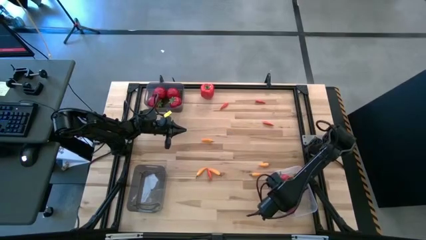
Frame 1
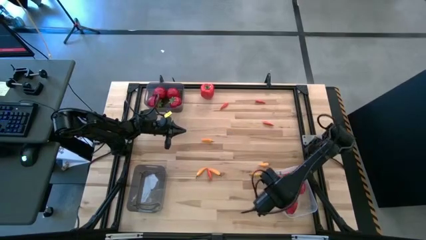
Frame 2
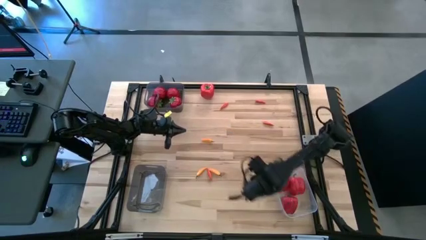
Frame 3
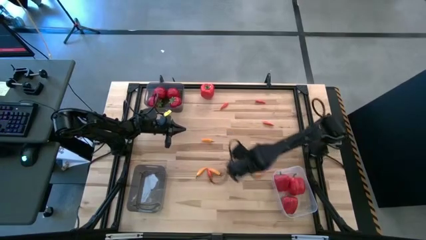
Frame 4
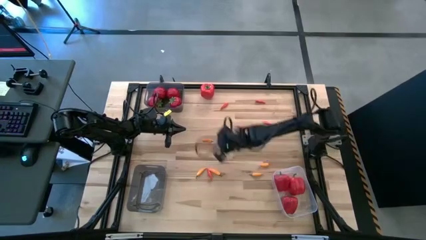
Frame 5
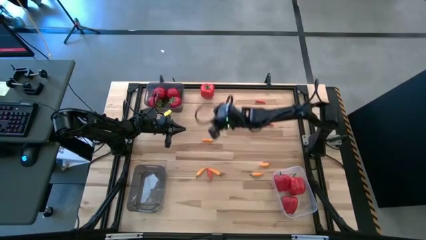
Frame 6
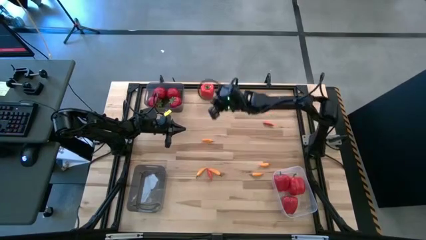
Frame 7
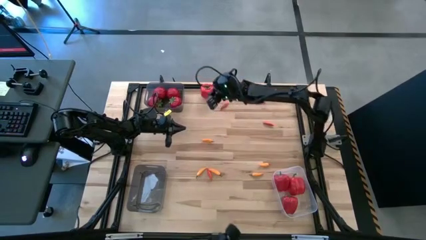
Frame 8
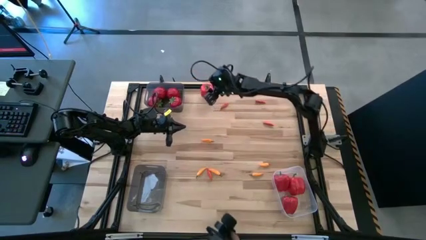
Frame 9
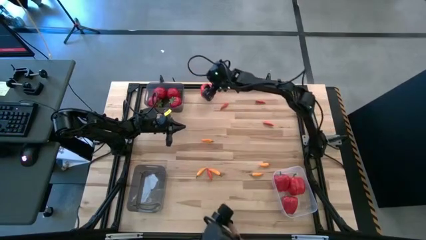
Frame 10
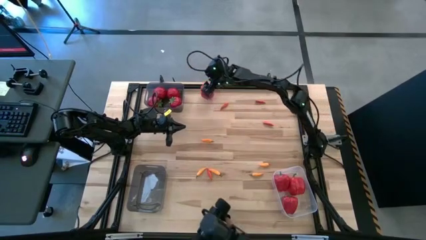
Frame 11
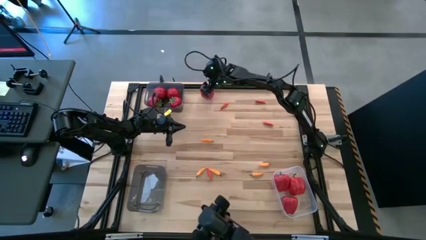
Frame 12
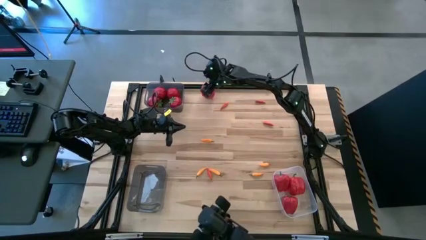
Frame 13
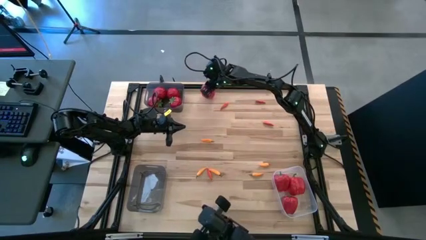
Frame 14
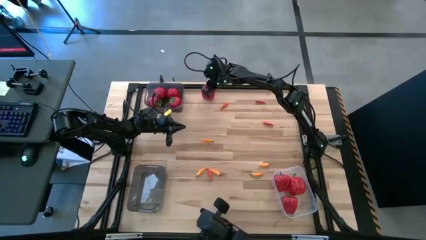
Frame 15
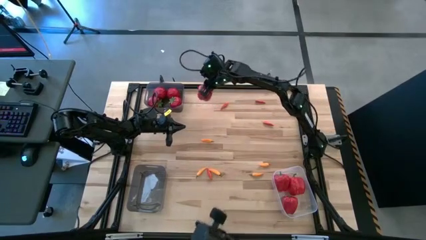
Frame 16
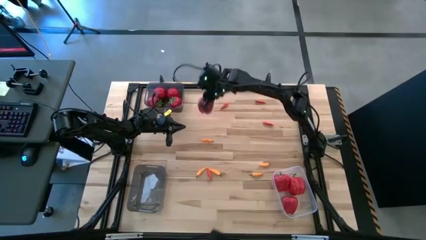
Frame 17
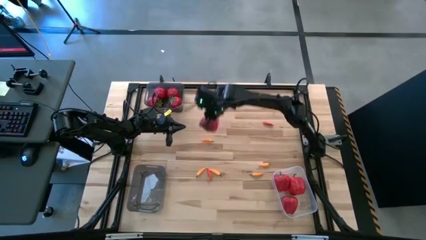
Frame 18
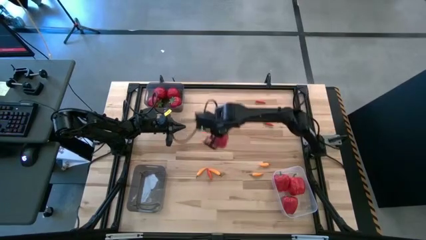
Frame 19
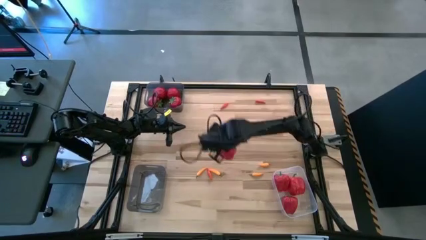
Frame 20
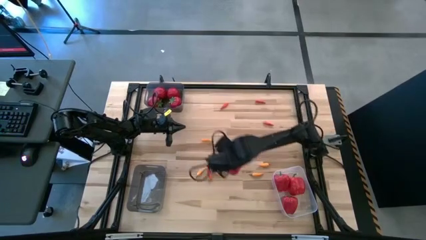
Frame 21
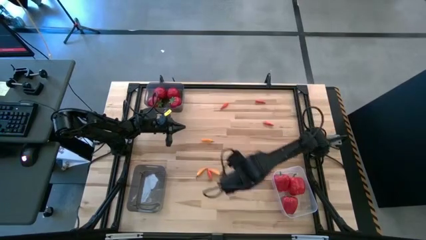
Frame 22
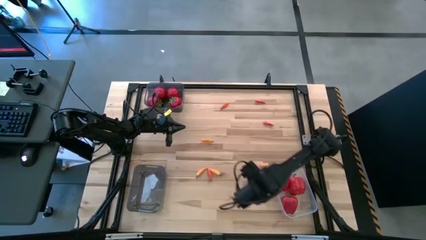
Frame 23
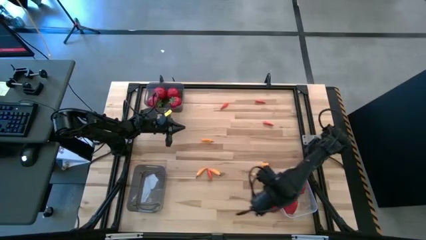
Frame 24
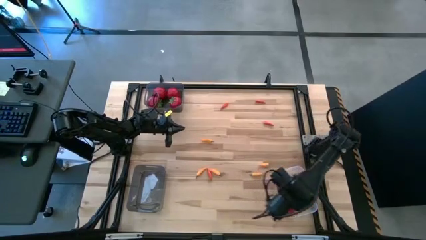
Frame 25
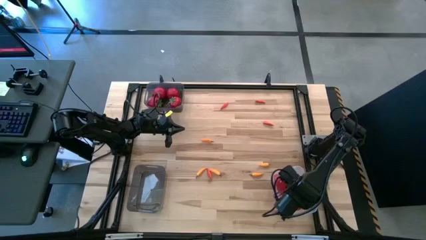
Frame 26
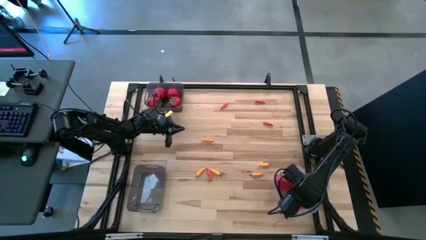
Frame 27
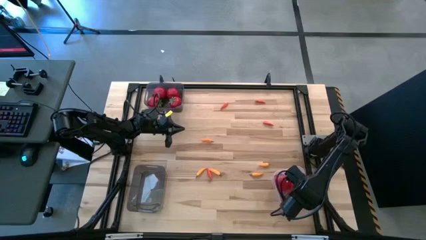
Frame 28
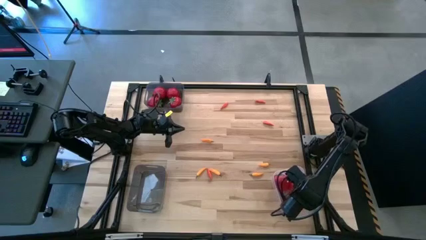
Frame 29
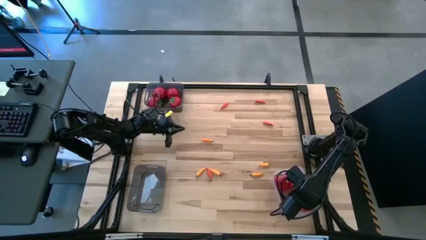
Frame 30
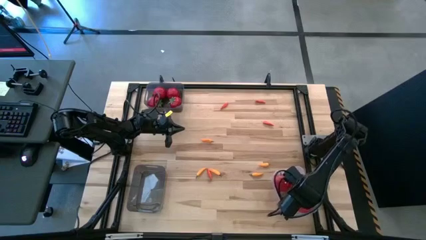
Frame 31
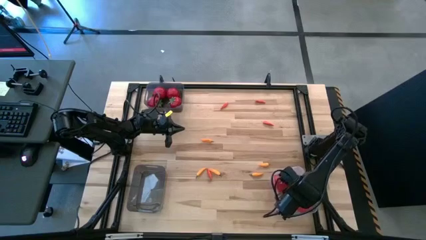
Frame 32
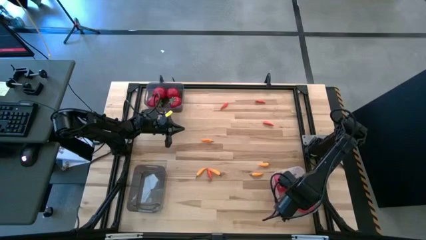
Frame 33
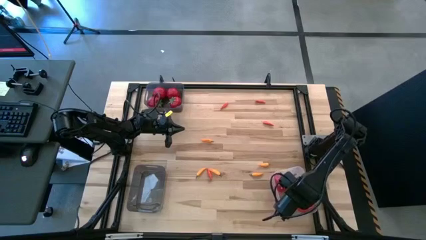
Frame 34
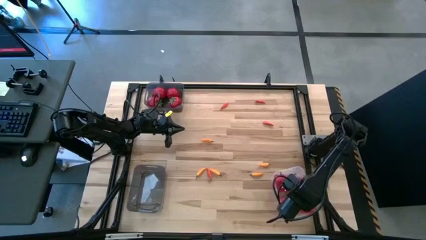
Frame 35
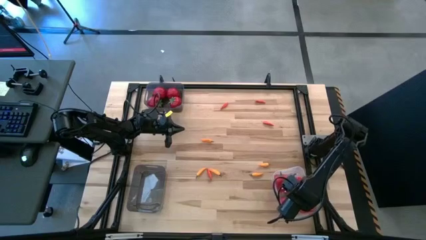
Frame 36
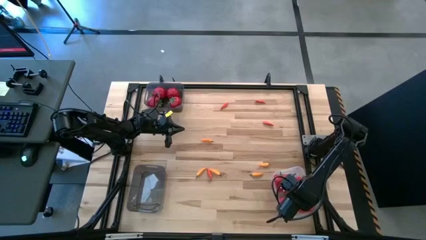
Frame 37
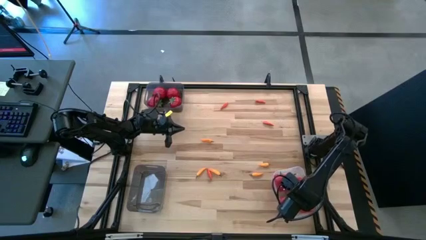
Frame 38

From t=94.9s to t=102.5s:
Task: Sort produce into baskets
Put the red bell pepper into the transparent bin

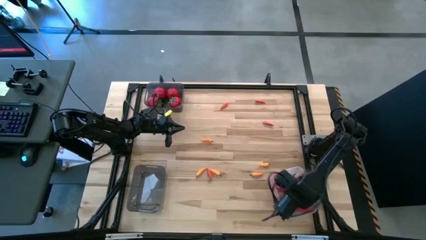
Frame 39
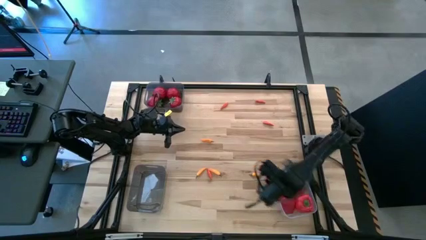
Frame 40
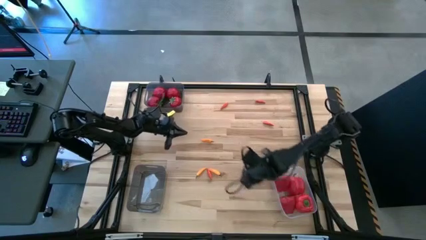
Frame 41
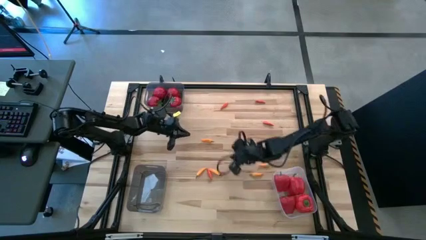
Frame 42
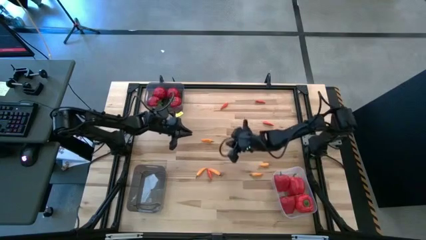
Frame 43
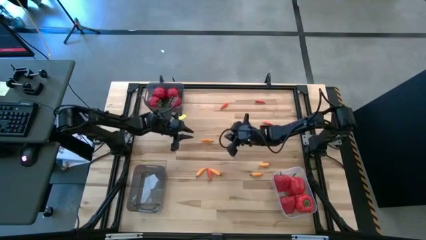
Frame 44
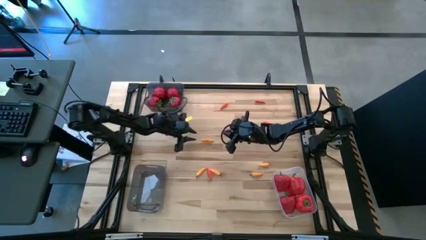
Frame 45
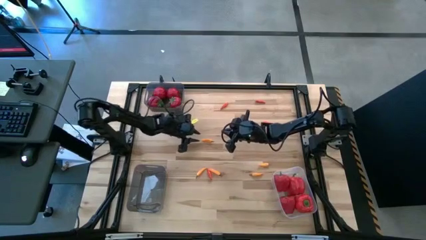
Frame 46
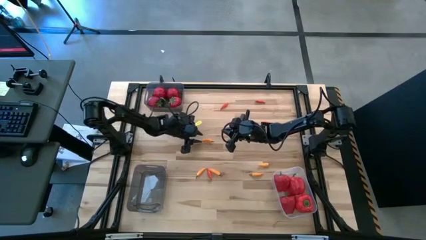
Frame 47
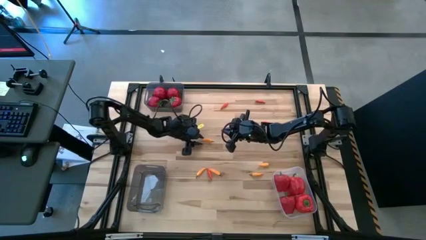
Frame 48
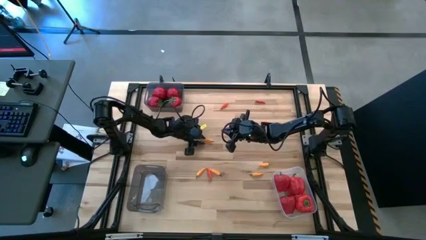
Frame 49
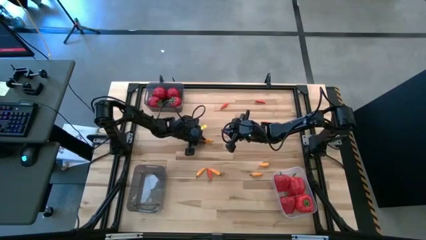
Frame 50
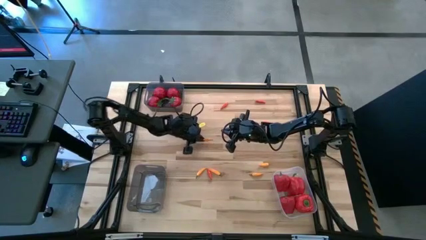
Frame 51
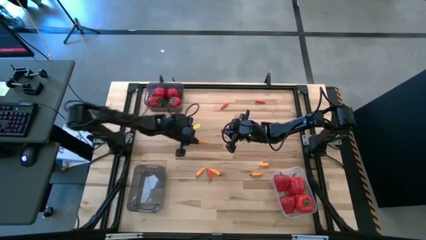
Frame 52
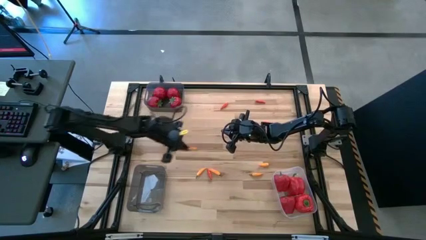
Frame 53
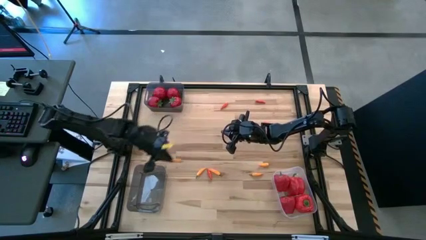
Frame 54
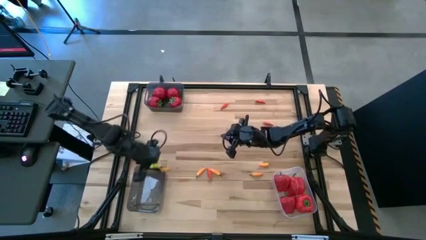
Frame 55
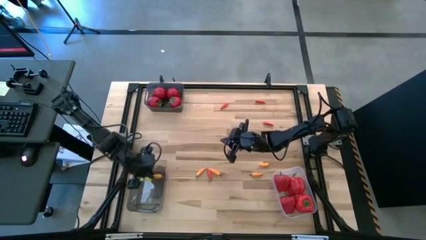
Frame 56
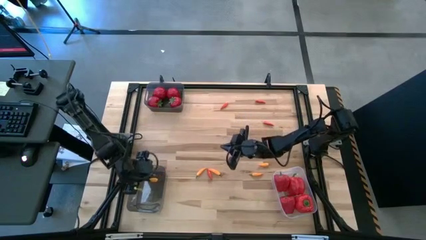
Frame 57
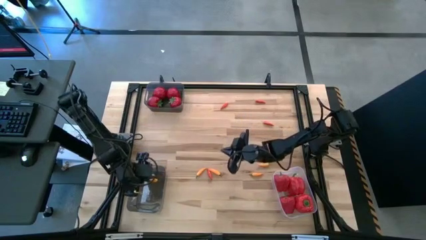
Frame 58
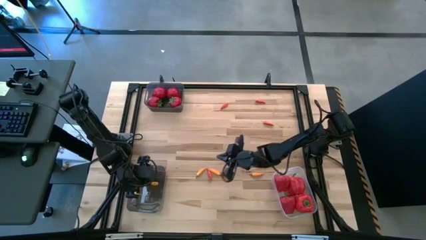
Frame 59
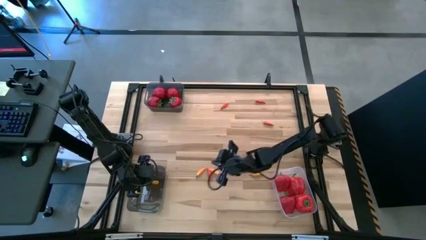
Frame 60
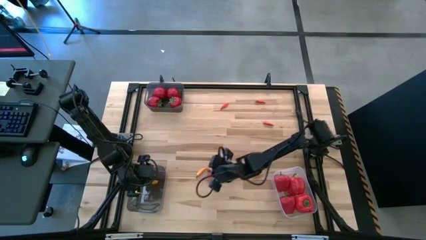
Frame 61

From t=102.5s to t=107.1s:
Put the yellow chili pepper into the bottom black bin

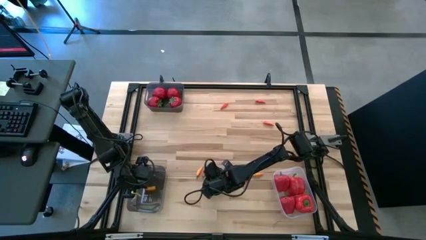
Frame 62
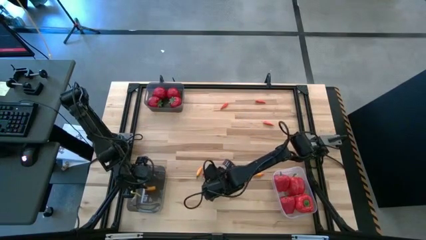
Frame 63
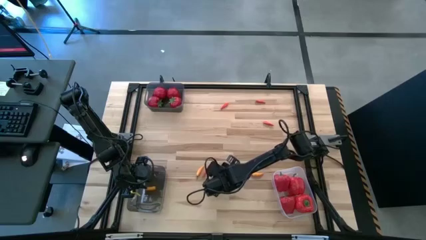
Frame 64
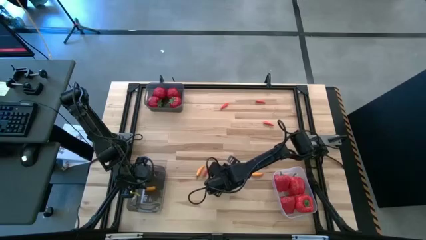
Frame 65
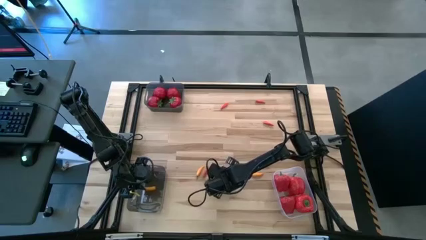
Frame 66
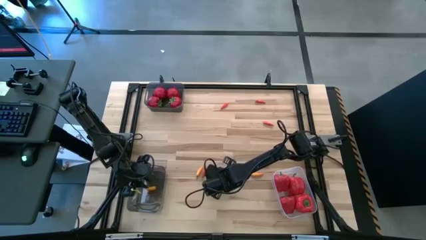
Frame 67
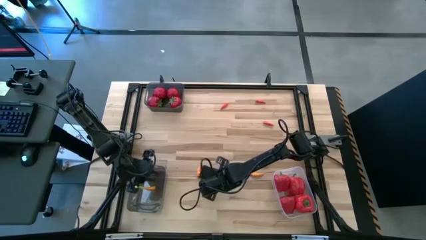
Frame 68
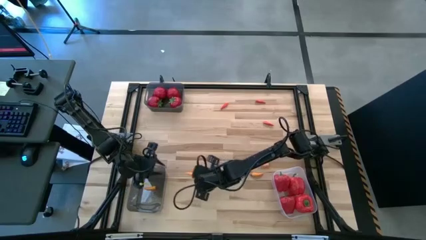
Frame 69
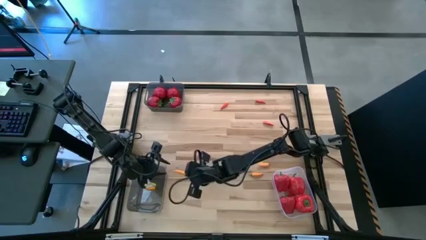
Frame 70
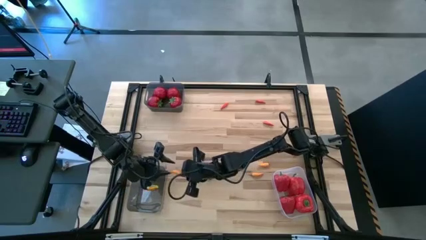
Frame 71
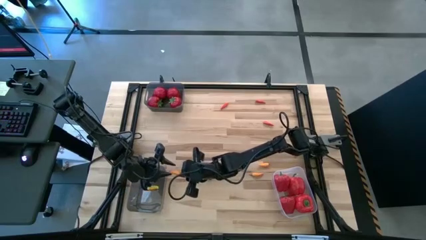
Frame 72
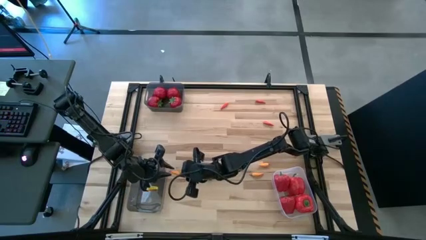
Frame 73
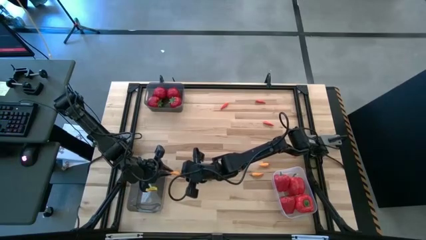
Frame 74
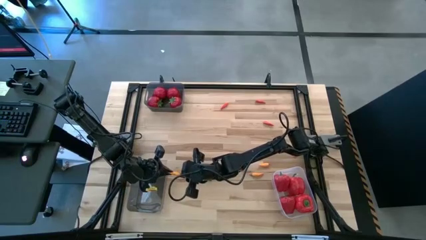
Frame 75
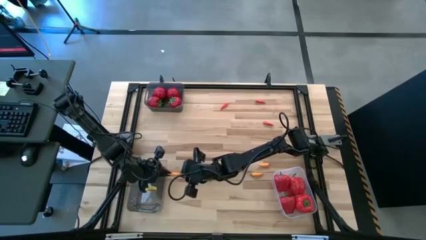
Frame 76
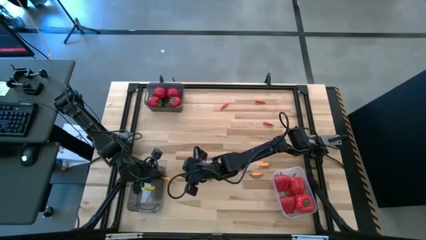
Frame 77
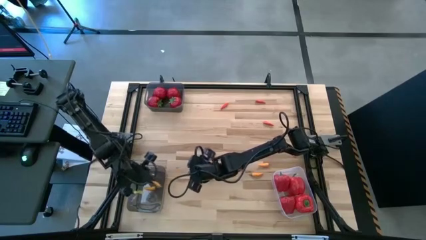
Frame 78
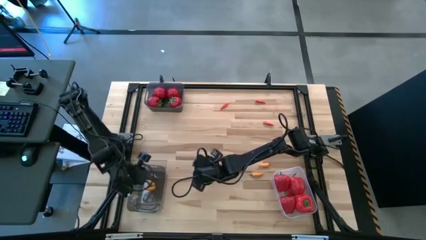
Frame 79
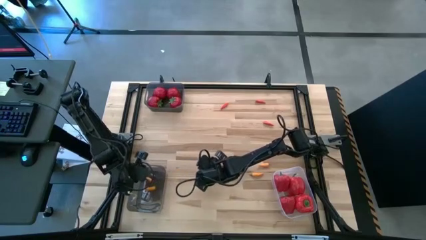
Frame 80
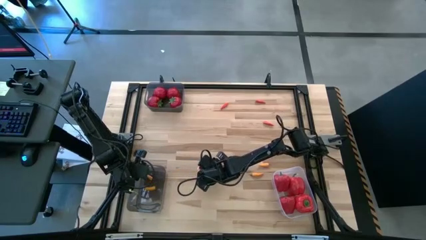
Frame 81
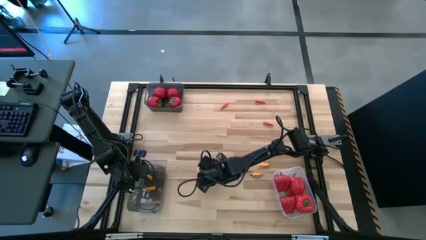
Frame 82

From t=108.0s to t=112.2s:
Put the yellow chili pepper into the bottom black bin
